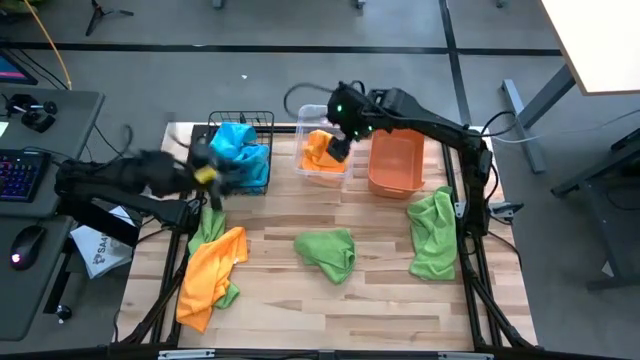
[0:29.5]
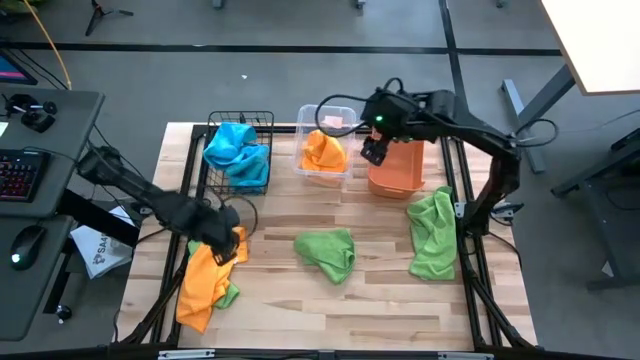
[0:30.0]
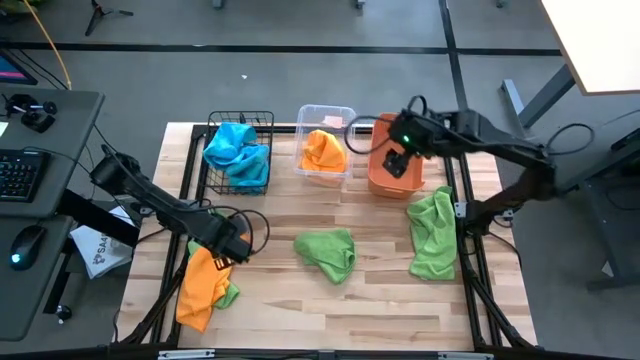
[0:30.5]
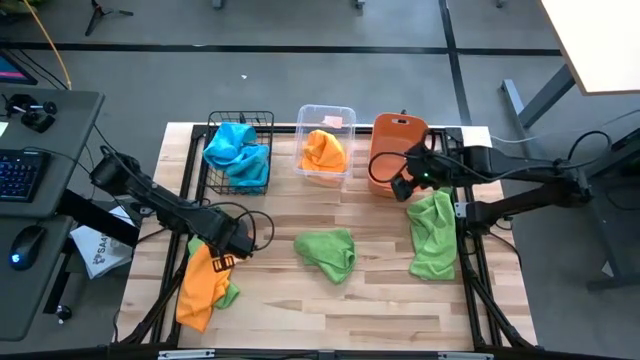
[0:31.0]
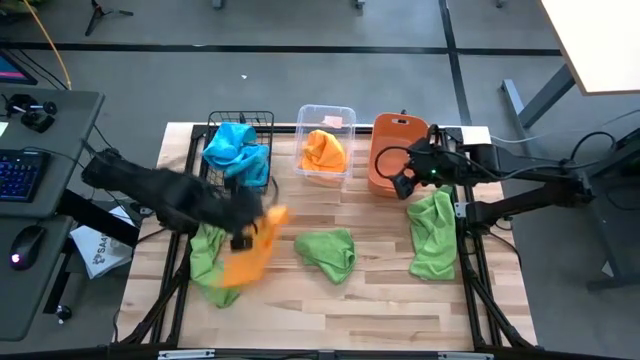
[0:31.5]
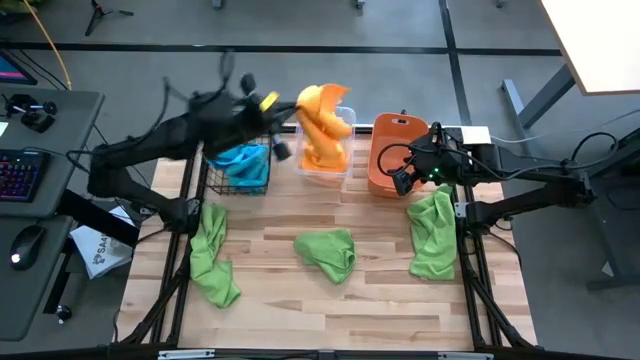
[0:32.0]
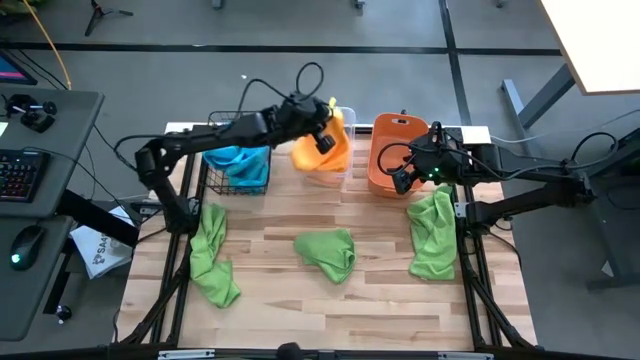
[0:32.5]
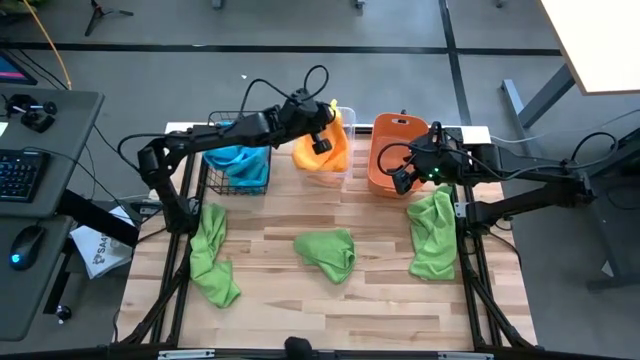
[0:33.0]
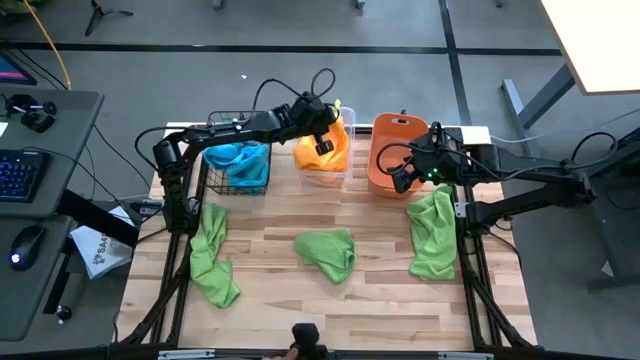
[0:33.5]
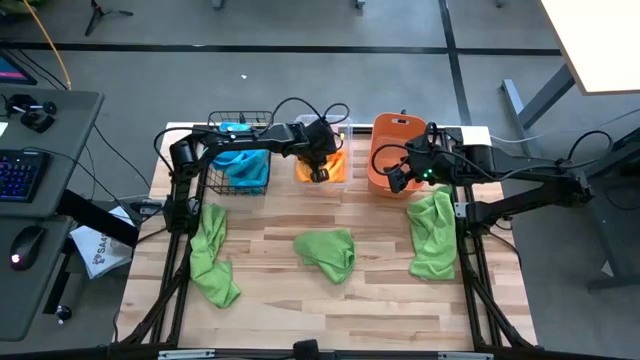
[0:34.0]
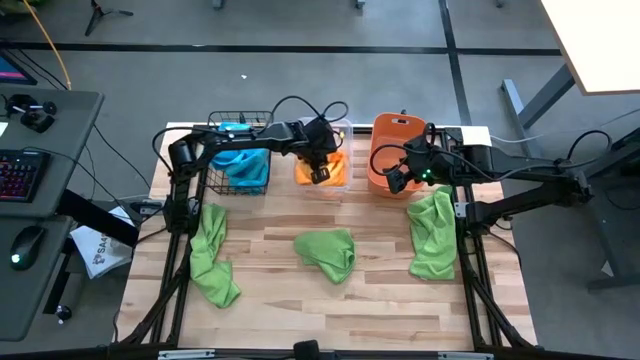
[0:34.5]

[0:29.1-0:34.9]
Task: Sort microfiber towel by color & place in baskets
Put the orange towel into the transparent bin

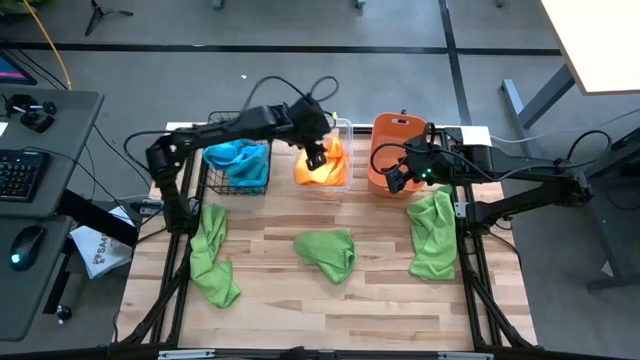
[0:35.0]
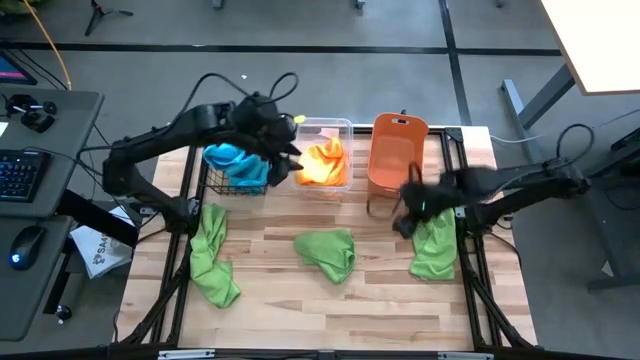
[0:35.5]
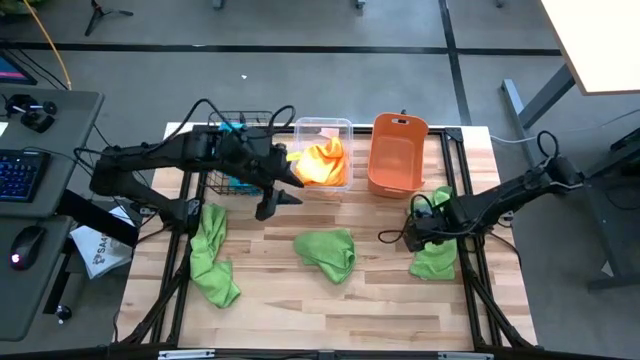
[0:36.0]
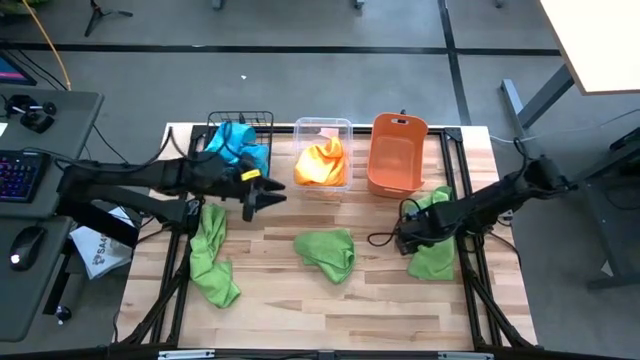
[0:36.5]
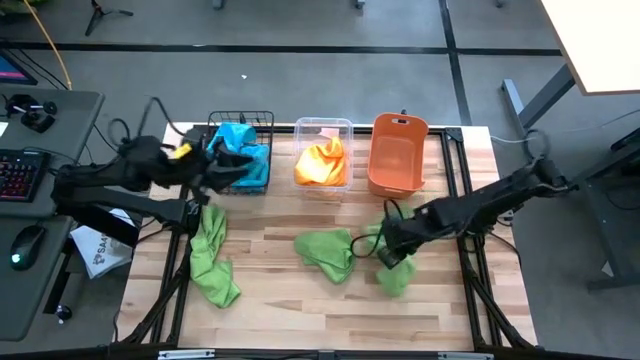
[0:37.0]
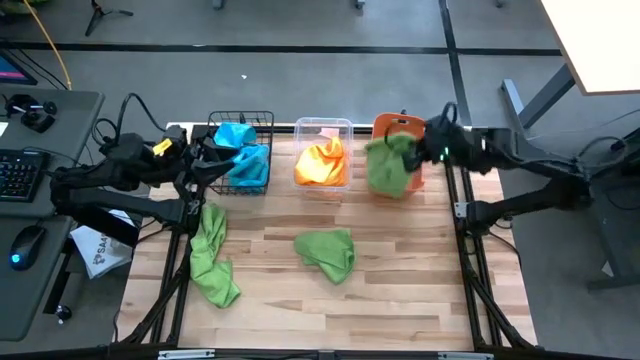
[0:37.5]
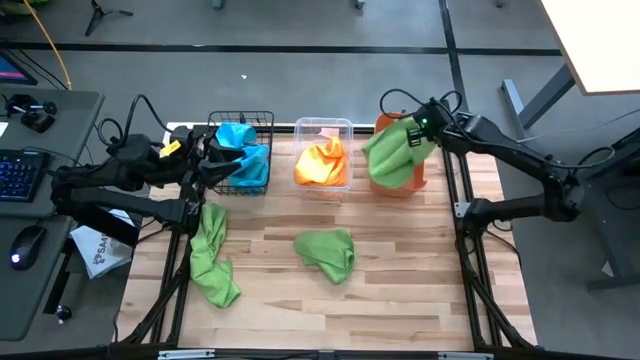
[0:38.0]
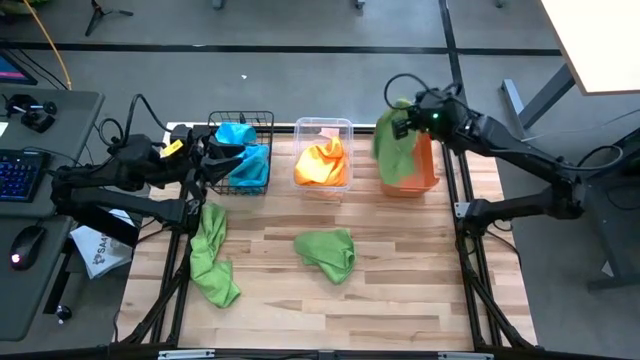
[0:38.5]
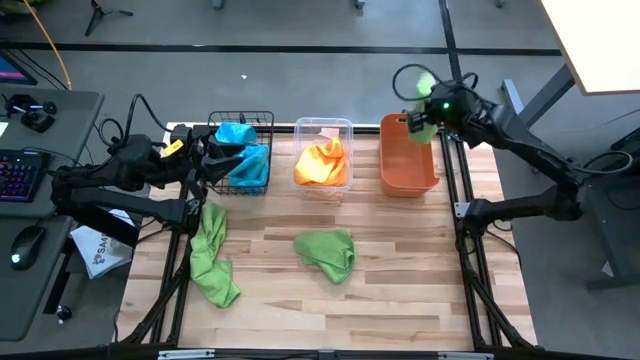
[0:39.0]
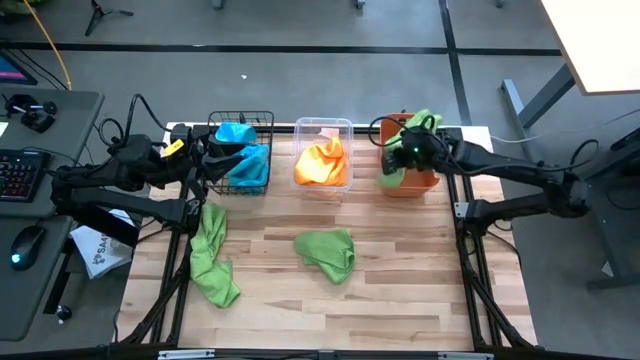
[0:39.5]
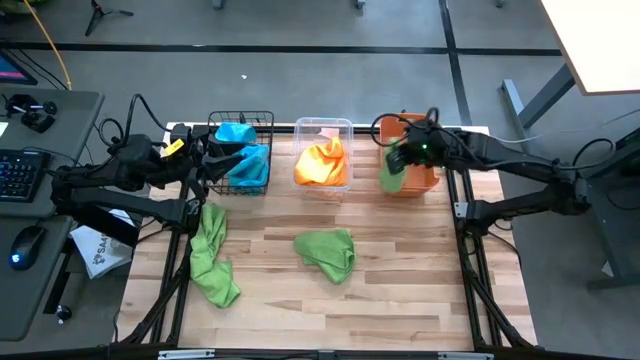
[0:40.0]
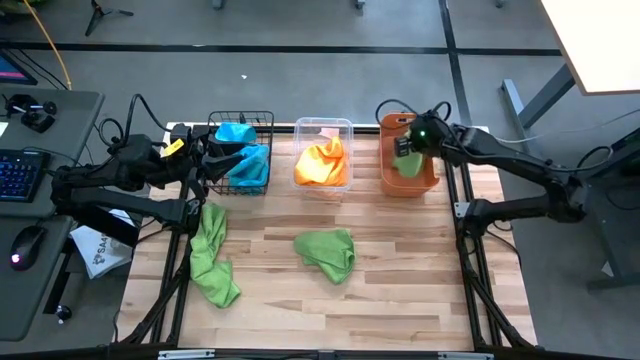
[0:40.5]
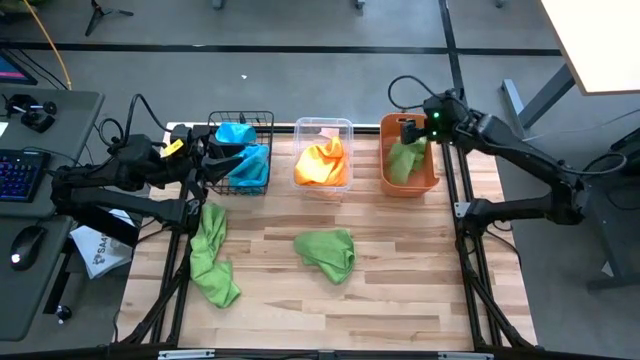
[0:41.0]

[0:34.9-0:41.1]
Put the right green towel into the orange bin

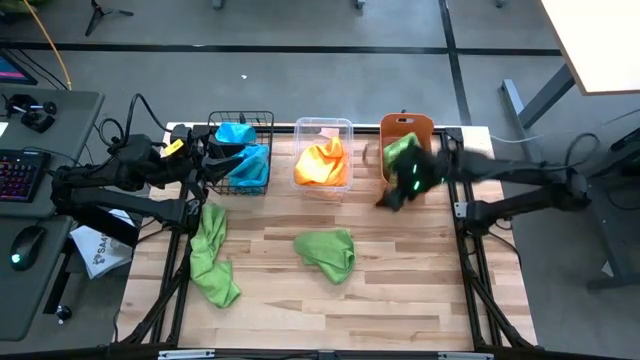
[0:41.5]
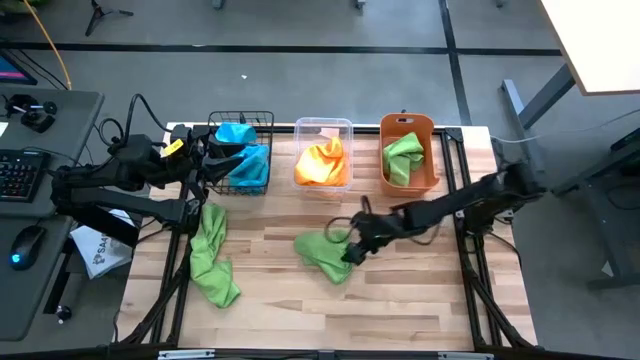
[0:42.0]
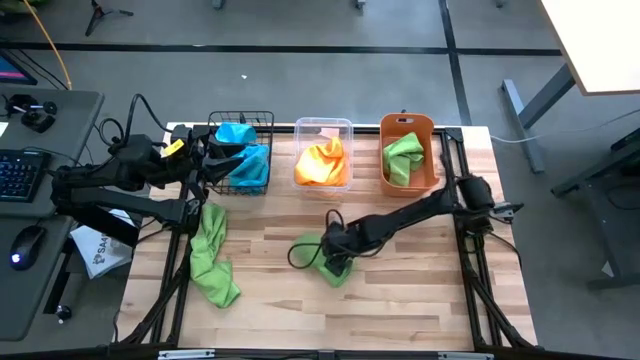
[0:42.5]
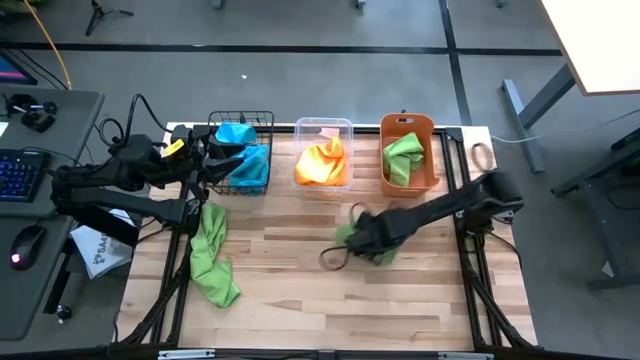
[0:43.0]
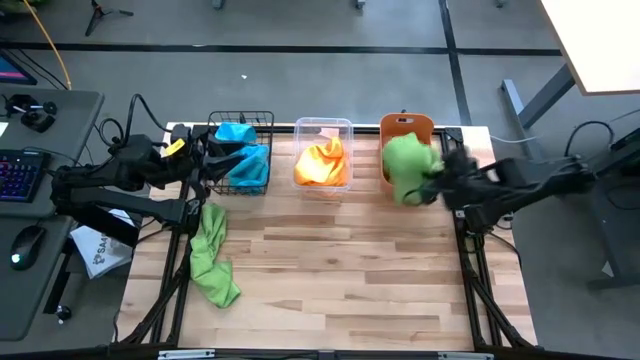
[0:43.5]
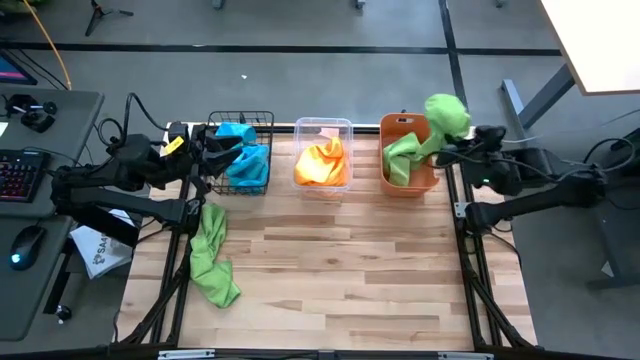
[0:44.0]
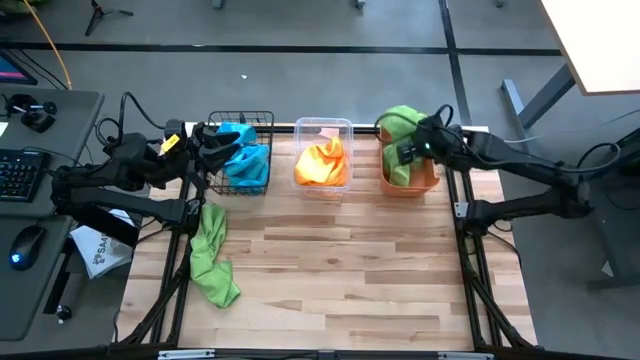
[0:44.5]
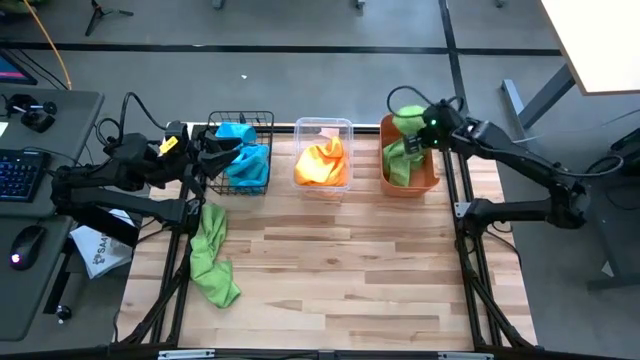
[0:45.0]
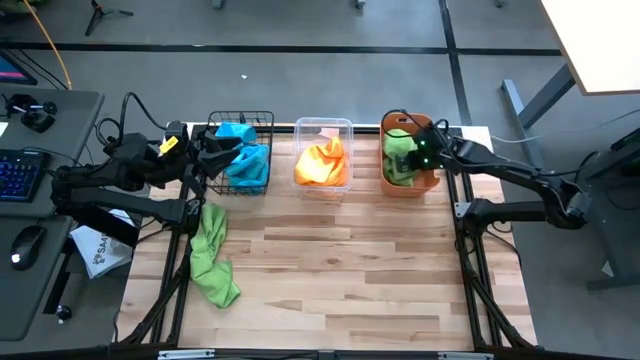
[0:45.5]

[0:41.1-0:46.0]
Put the right green towel into the orange bin

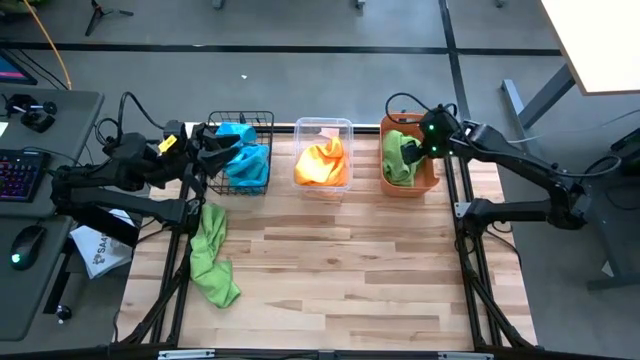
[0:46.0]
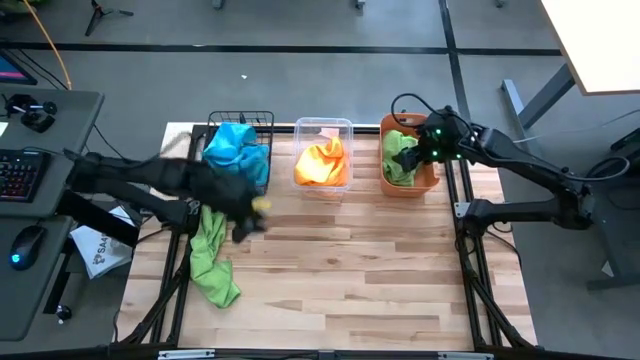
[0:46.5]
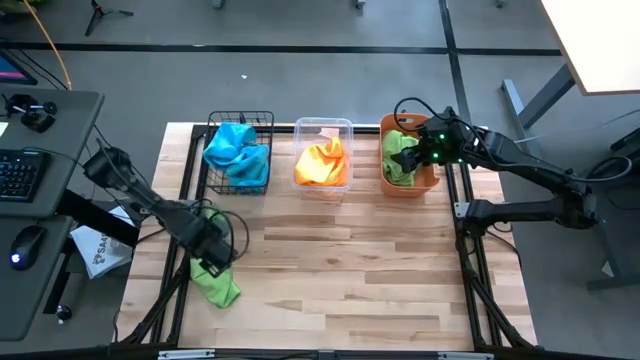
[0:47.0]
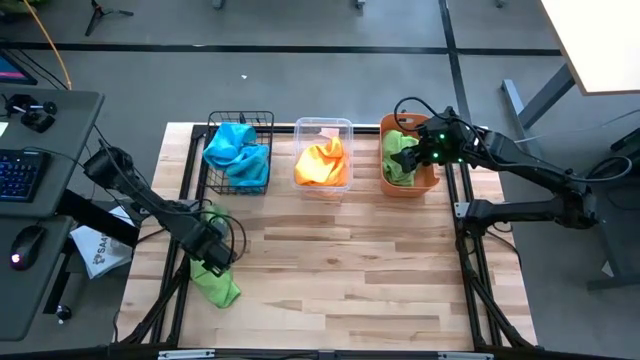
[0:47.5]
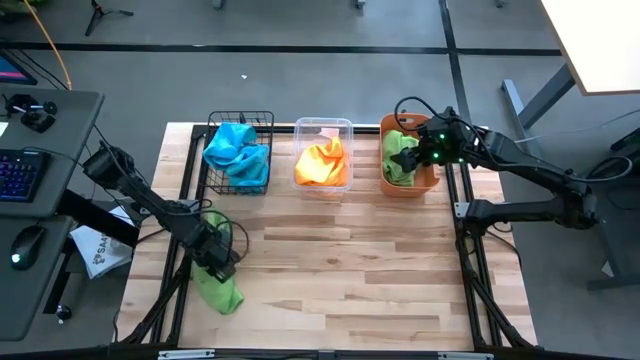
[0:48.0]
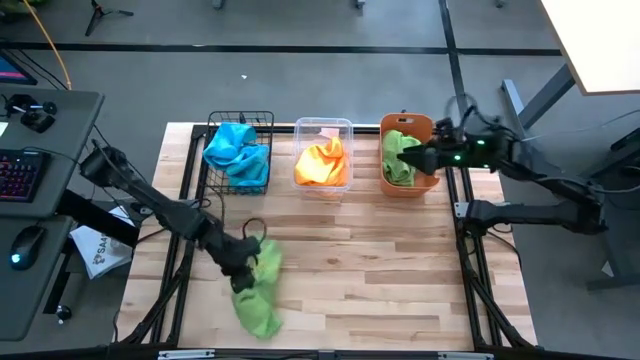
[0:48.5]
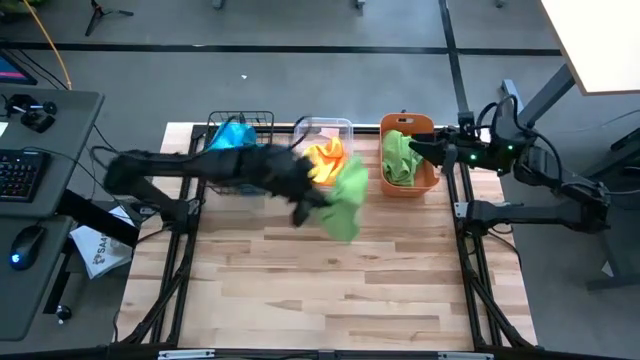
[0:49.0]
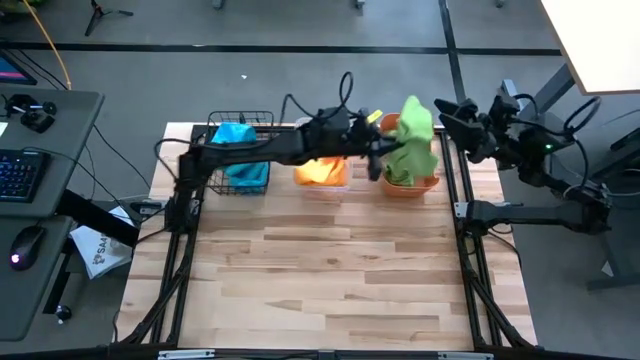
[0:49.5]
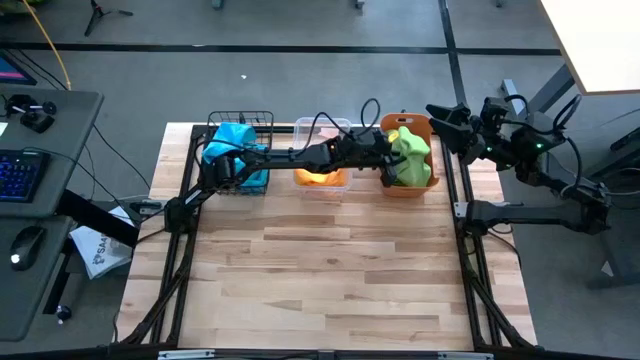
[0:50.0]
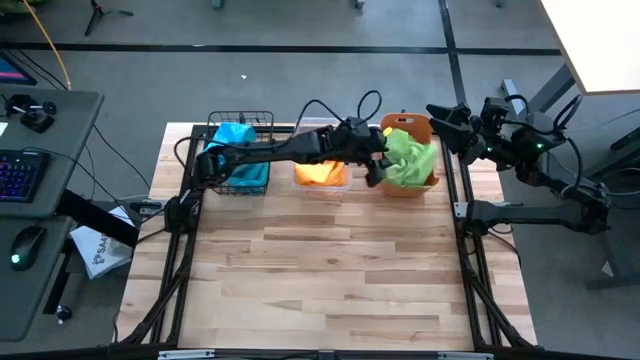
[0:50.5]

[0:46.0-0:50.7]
Put the green towel into the orange bin
